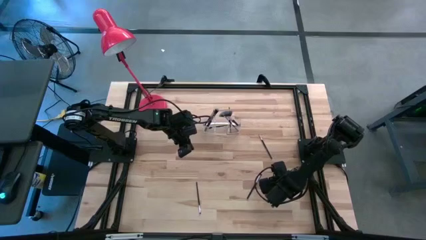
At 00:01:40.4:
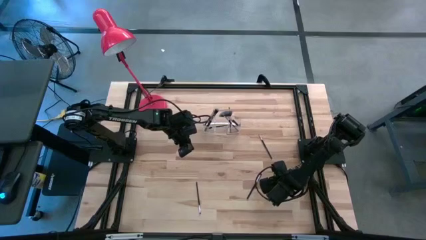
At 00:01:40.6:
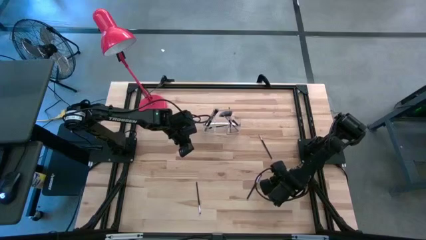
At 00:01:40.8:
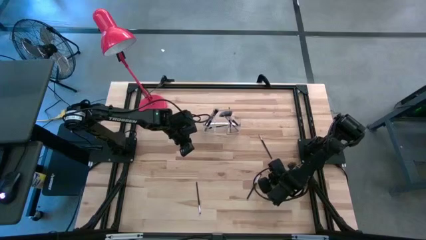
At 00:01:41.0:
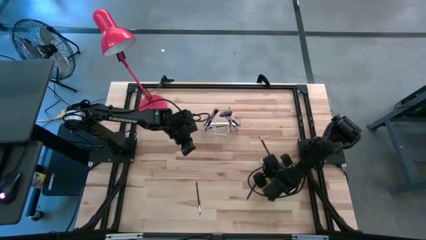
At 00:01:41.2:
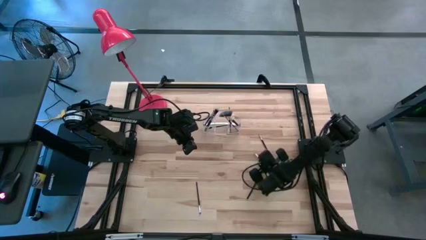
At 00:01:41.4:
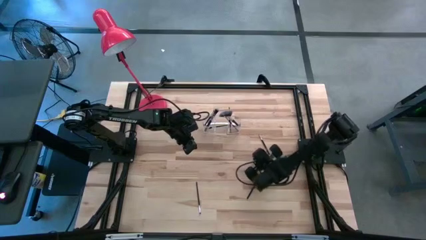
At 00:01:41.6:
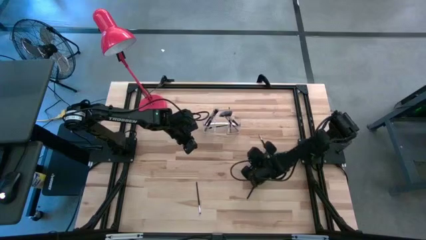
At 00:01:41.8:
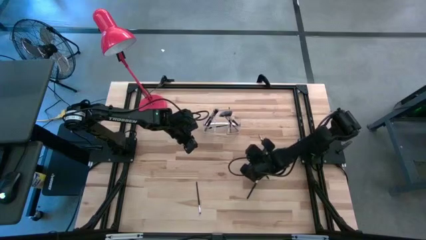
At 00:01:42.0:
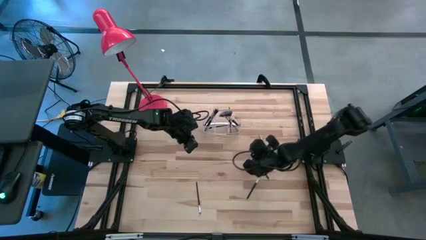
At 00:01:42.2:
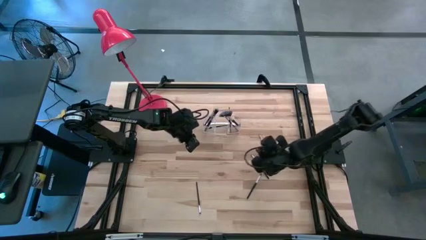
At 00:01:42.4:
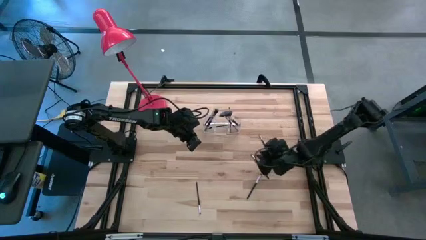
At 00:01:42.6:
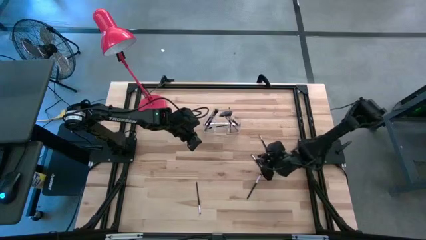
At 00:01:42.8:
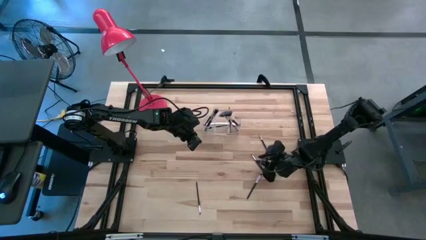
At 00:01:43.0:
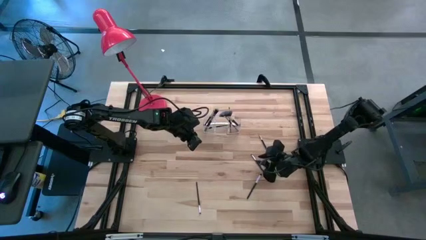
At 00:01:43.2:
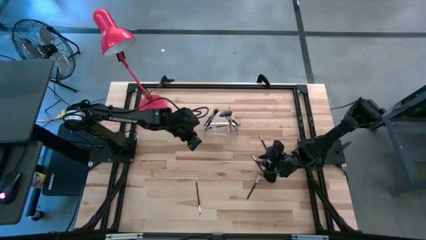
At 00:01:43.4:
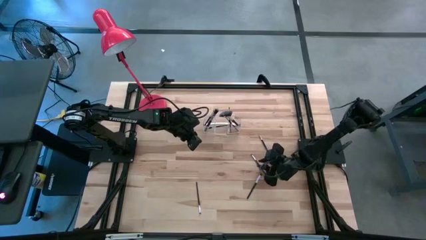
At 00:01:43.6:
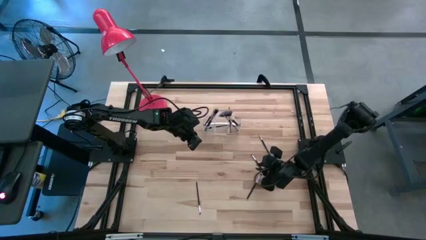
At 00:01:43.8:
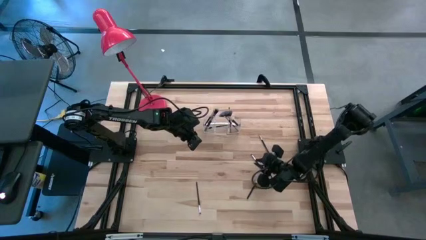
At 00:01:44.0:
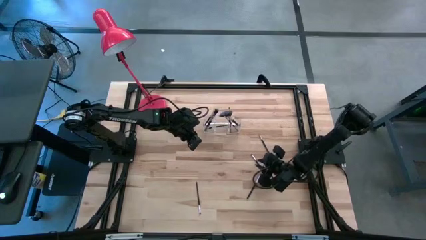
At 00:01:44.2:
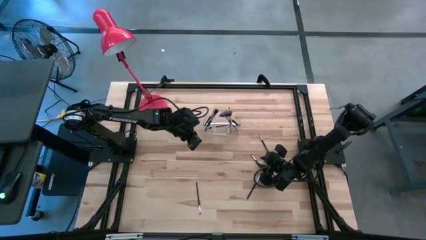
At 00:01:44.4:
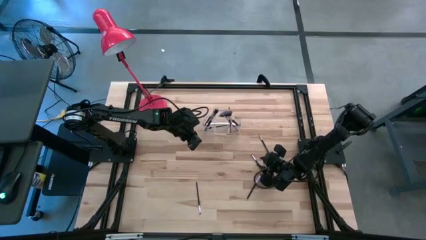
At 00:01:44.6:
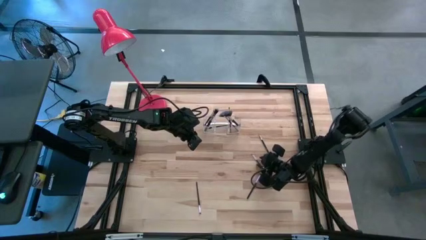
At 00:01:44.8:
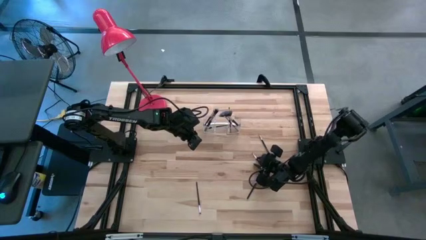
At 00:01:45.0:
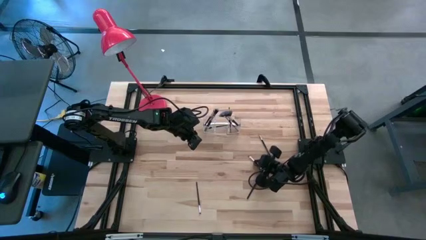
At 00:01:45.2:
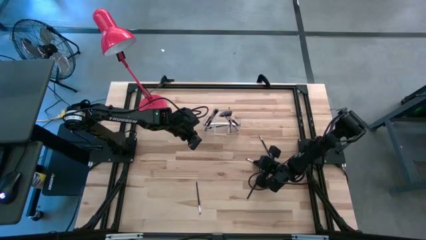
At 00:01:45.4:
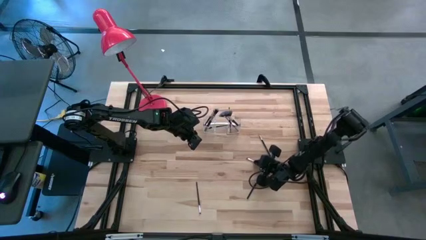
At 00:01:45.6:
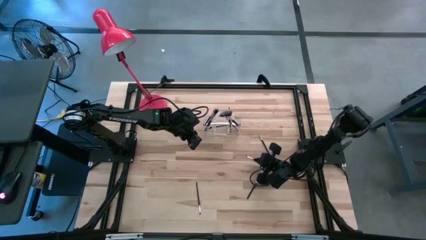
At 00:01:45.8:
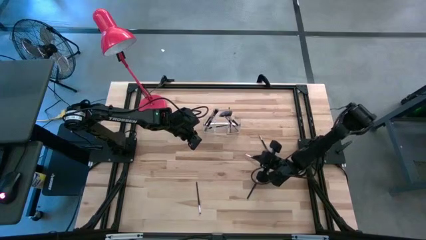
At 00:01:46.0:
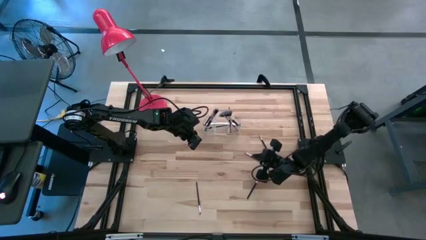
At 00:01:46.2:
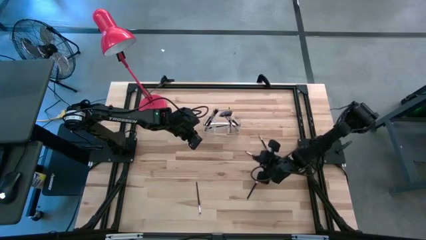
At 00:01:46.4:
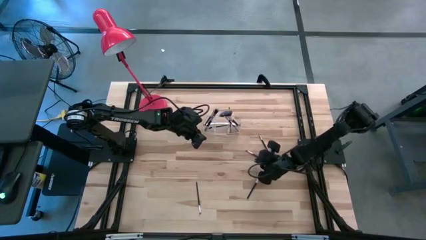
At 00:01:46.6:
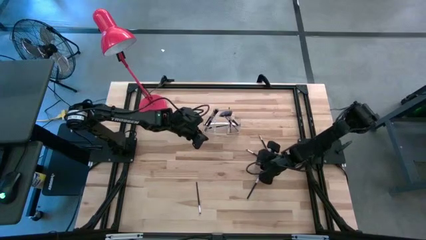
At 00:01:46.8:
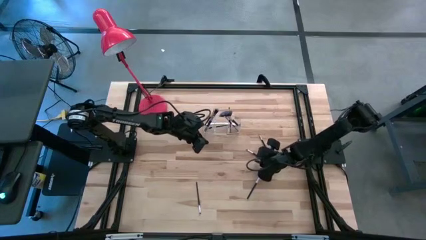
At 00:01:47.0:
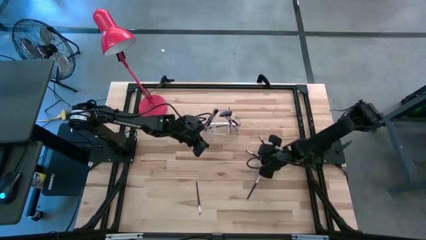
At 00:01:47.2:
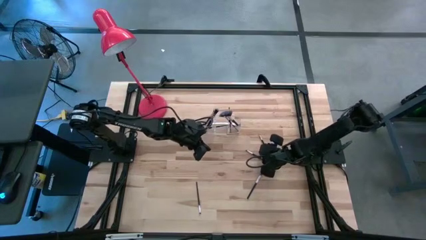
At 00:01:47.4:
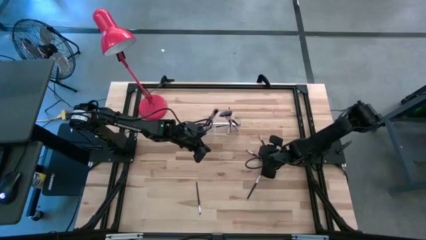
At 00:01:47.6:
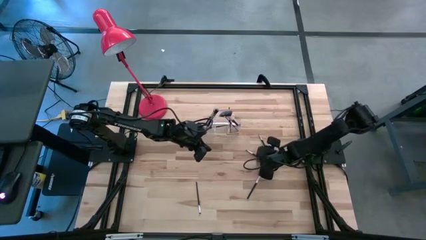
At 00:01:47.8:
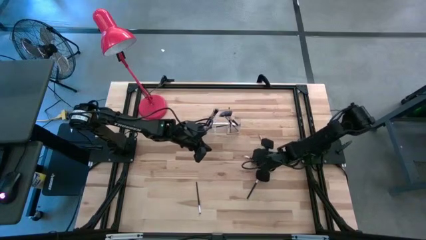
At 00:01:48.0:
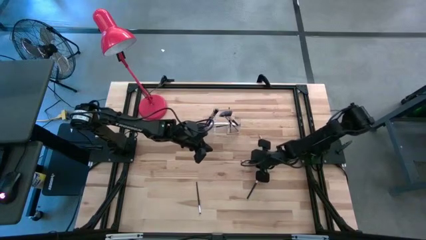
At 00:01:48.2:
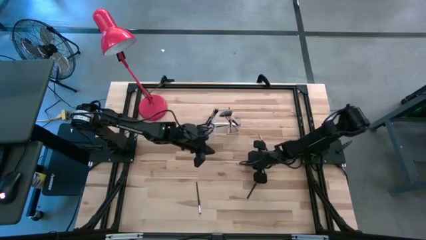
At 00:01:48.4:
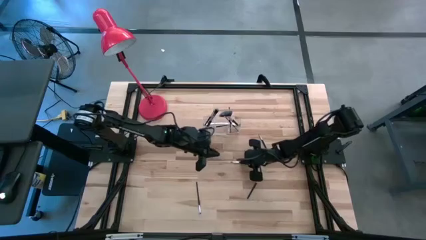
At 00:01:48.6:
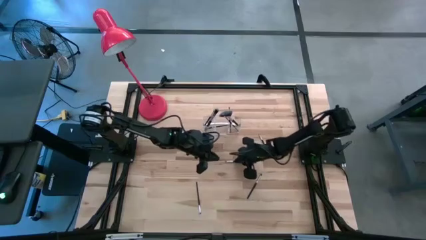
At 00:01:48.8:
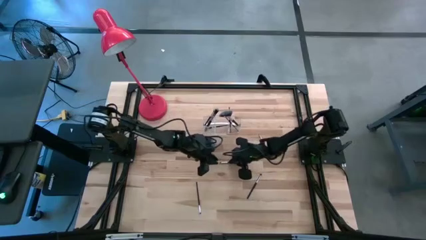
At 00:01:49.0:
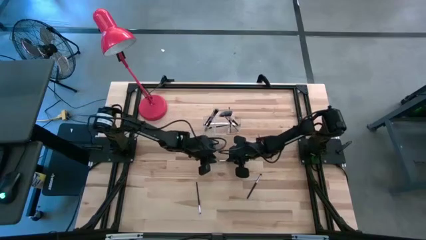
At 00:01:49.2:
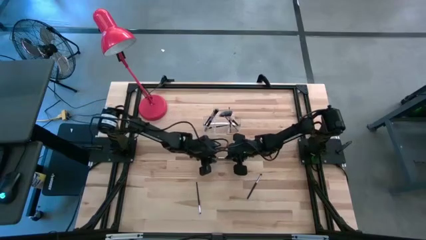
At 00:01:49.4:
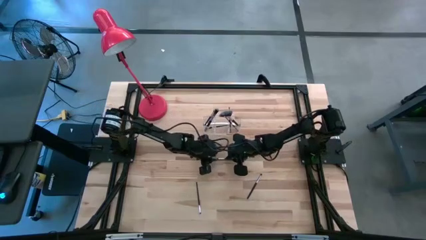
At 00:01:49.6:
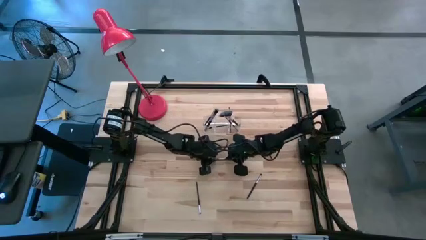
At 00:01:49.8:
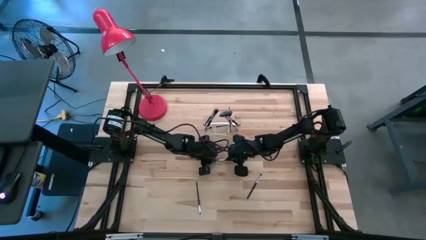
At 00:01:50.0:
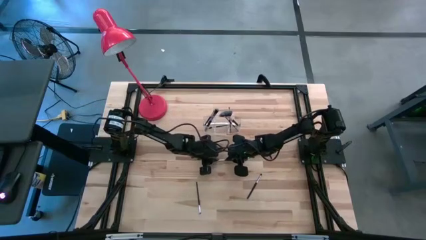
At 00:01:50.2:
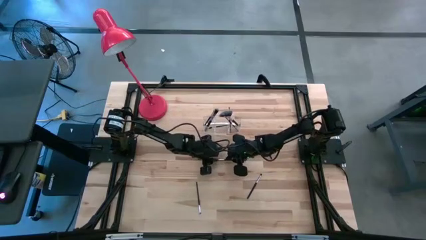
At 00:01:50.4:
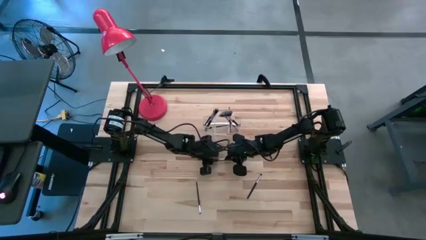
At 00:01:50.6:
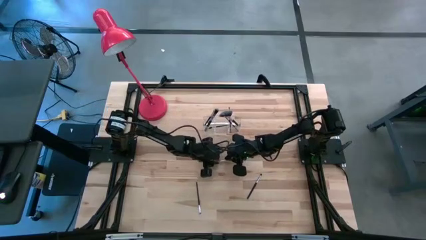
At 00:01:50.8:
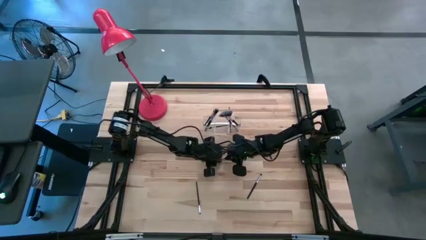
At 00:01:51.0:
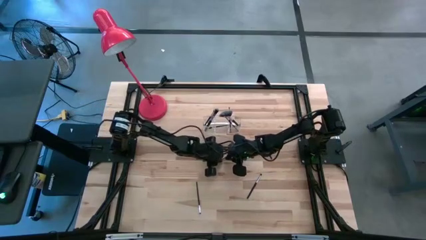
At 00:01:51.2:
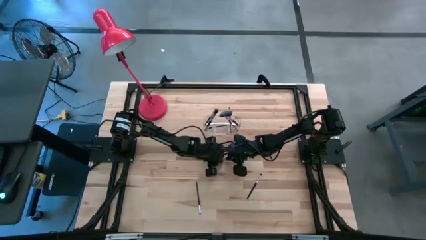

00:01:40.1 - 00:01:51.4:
Task: Pick & Place Makeup Supplies
Put the makeup brush into the transparent organizer

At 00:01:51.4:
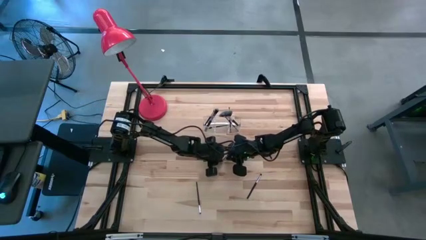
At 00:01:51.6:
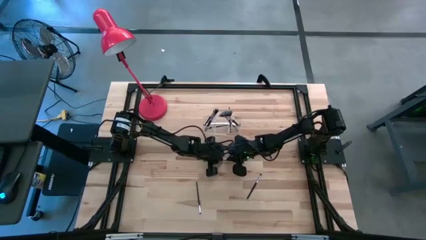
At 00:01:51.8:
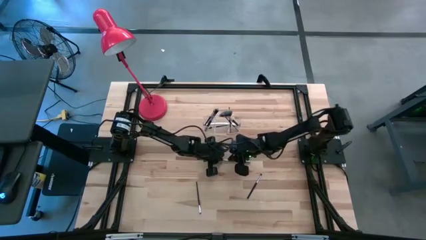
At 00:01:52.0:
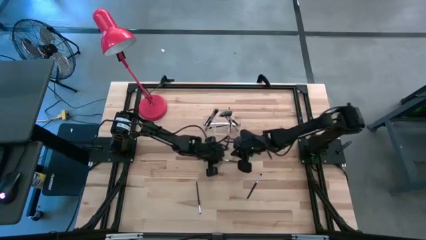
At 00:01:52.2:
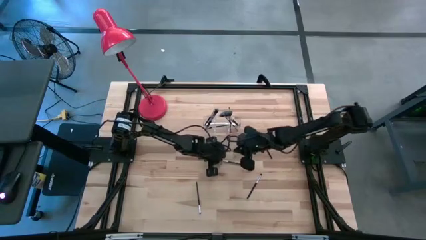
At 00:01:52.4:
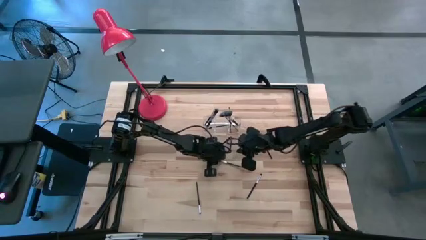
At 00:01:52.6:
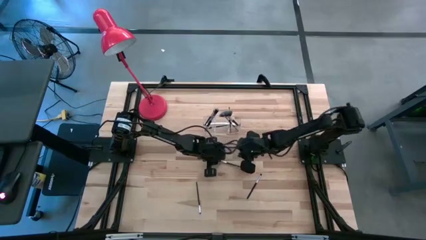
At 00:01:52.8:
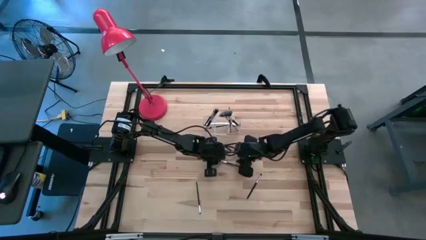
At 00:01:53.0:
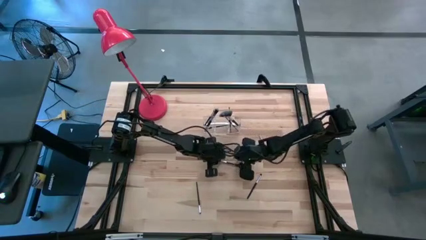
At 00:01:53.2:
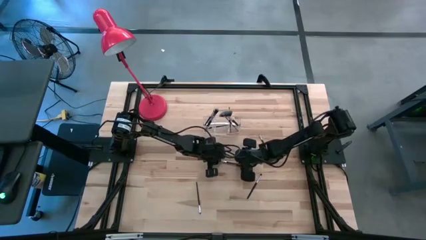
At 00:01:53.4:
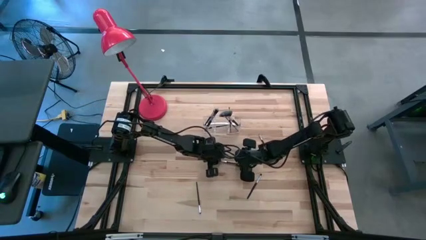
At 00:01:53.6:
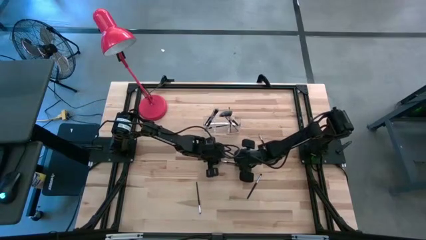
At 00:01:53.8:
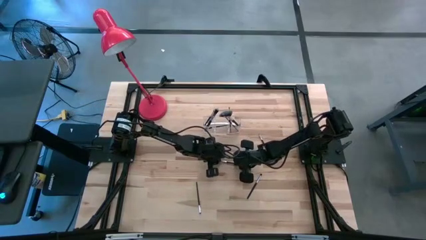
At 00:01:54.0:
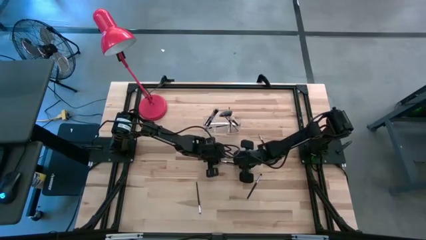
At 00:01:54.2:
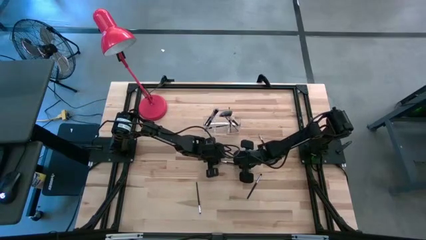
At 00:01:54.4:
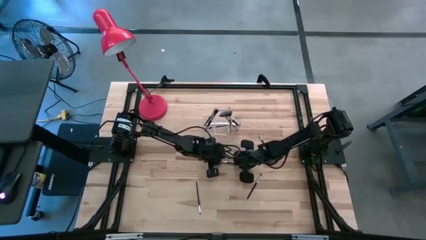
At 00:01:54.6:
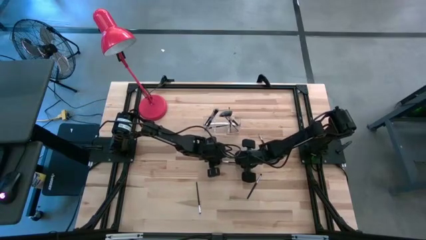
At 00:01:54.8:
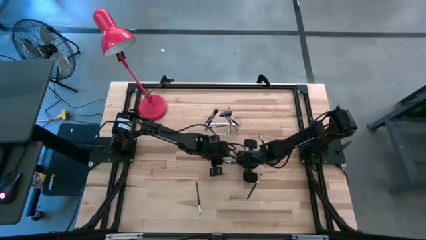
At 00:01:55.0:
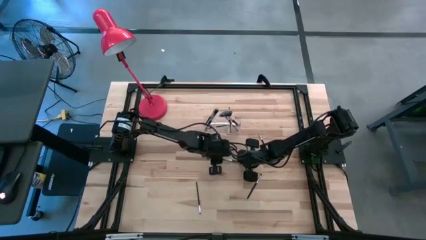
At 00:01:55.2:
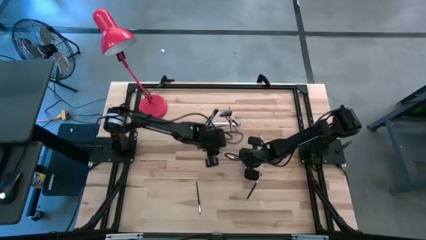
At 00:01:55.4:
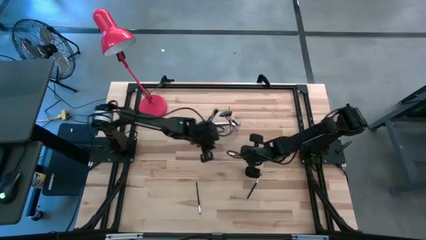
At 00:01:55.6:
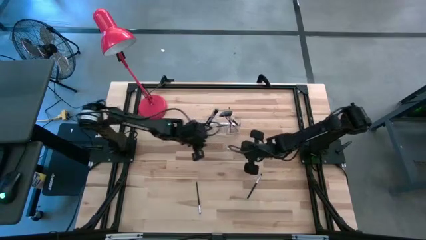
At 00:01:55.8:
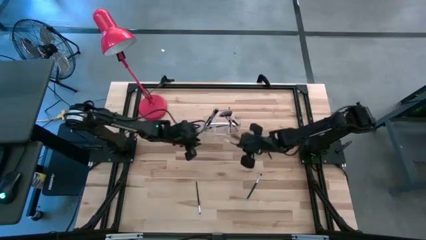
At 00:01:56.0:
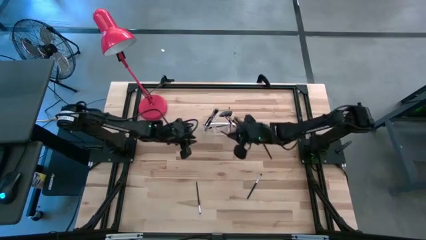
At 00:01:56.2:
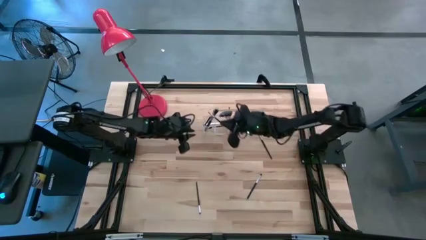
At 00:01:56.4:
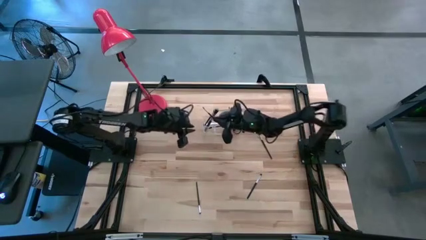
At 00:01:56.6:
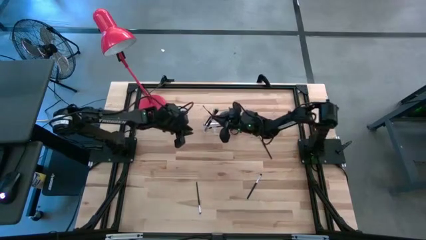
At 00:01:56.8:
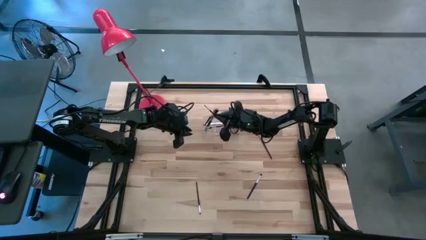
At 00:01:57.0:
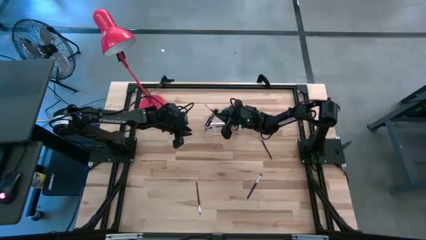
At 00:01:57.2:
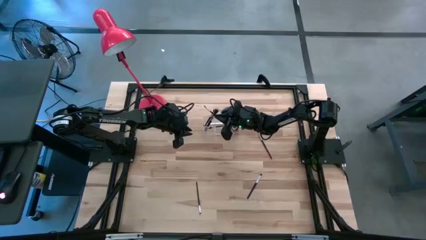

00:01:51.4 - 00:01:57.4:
Put the makeup brush into the transparent organizer
